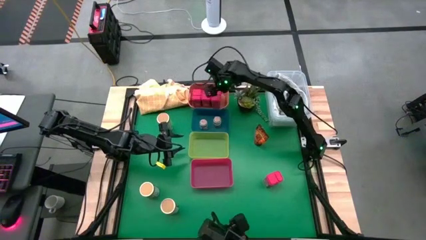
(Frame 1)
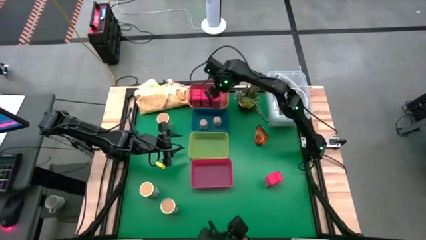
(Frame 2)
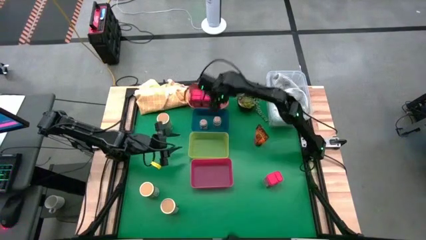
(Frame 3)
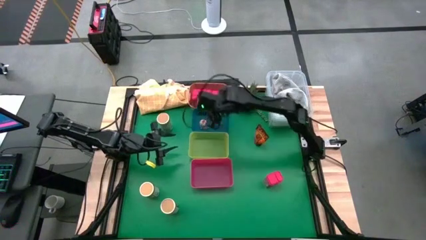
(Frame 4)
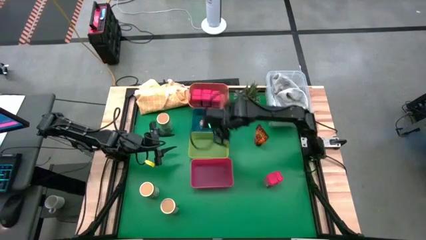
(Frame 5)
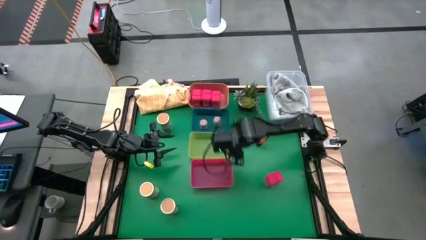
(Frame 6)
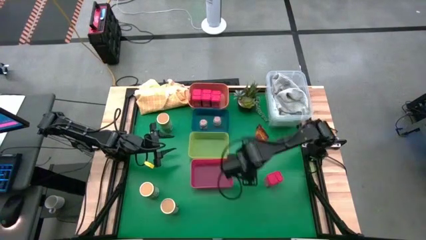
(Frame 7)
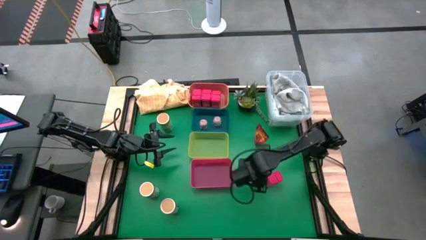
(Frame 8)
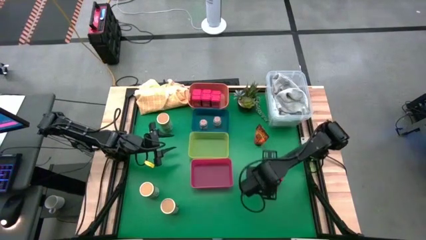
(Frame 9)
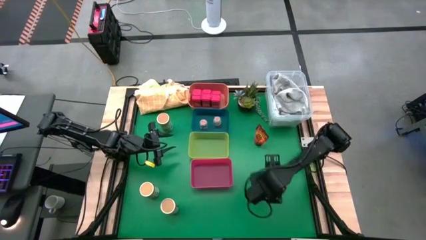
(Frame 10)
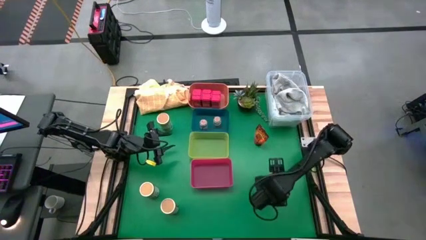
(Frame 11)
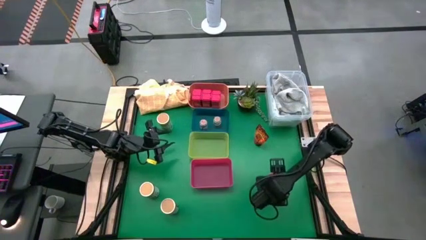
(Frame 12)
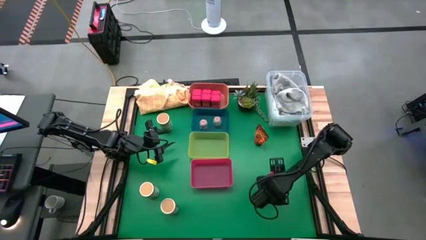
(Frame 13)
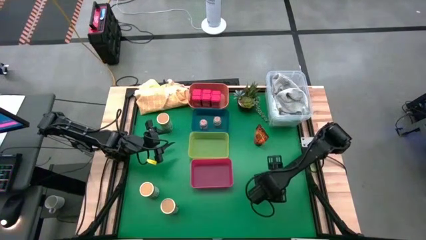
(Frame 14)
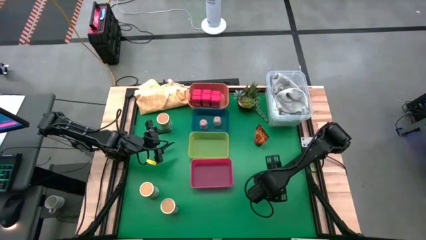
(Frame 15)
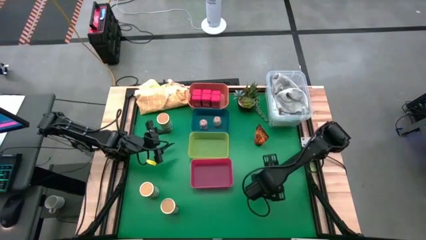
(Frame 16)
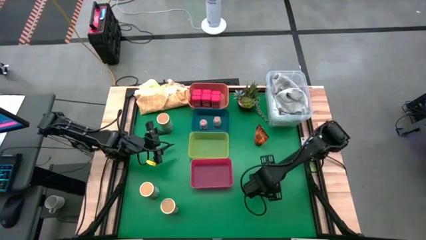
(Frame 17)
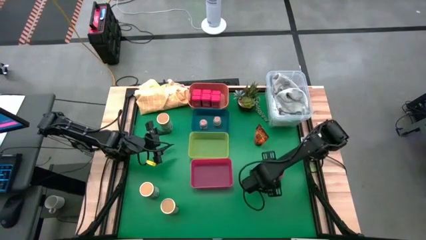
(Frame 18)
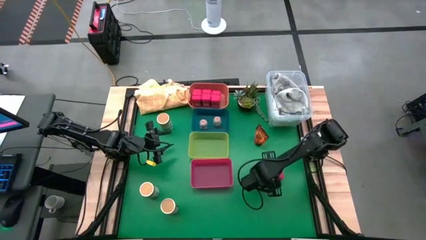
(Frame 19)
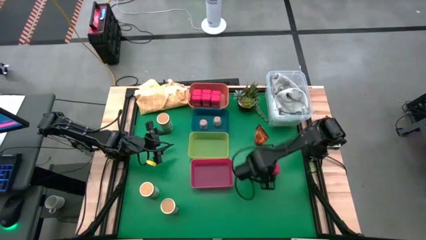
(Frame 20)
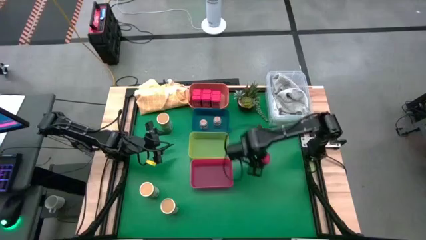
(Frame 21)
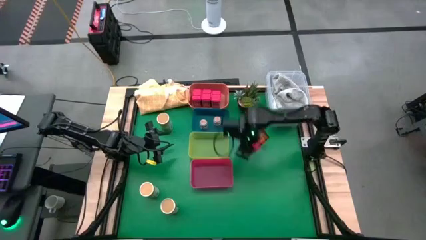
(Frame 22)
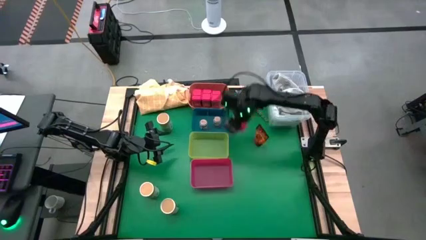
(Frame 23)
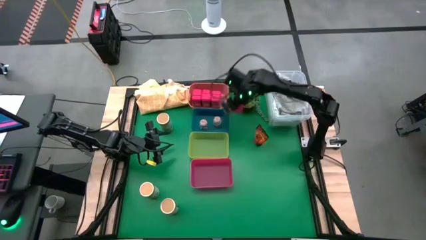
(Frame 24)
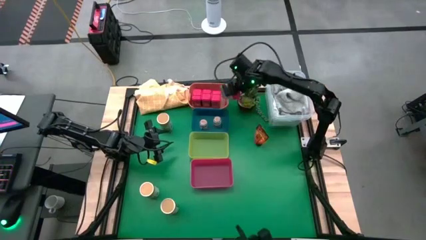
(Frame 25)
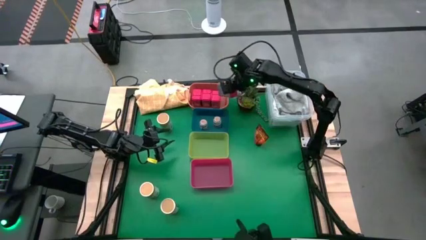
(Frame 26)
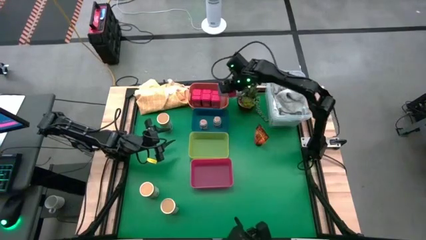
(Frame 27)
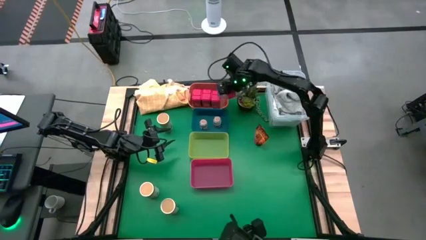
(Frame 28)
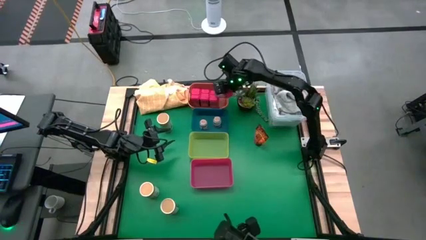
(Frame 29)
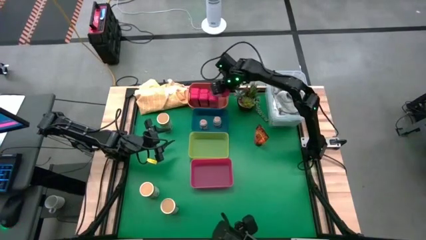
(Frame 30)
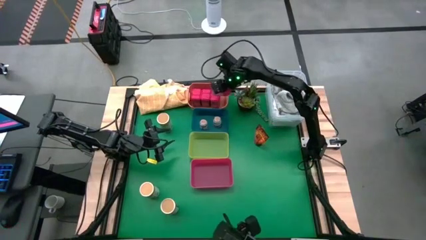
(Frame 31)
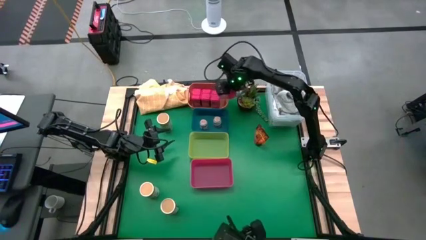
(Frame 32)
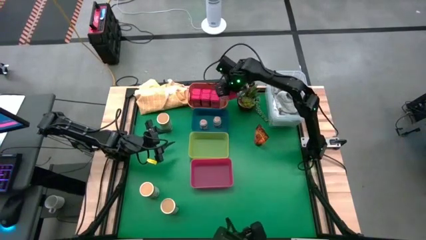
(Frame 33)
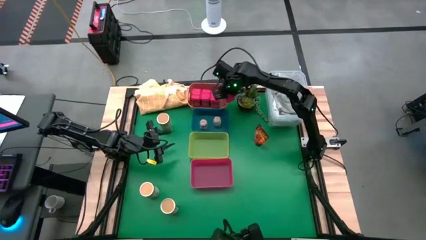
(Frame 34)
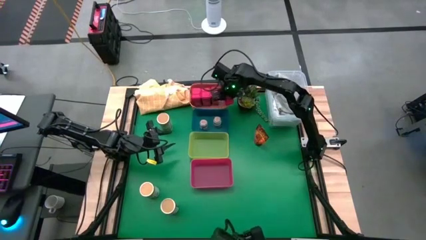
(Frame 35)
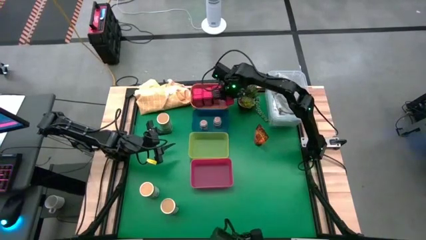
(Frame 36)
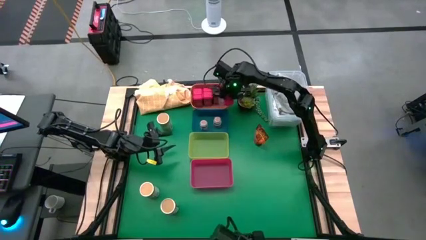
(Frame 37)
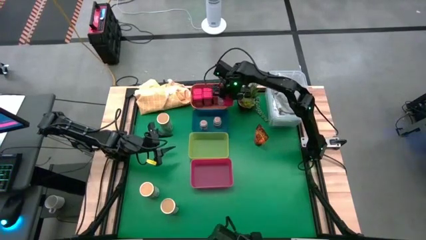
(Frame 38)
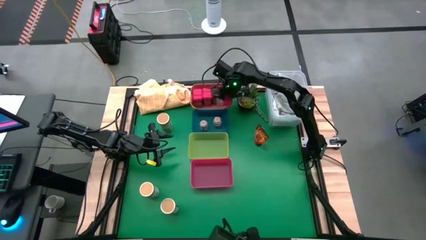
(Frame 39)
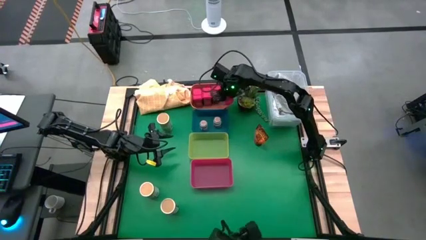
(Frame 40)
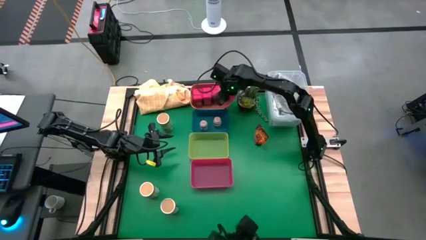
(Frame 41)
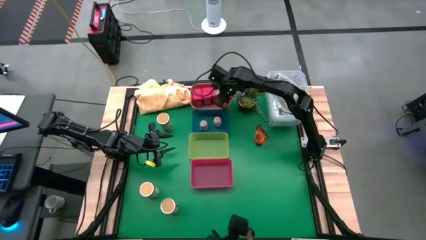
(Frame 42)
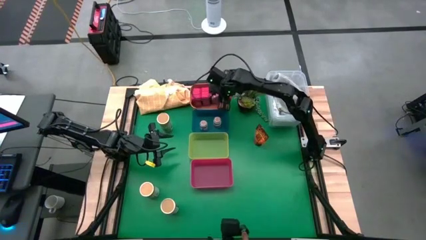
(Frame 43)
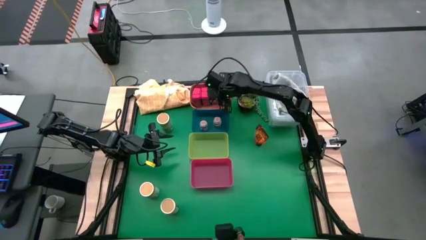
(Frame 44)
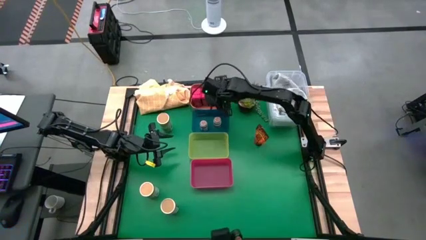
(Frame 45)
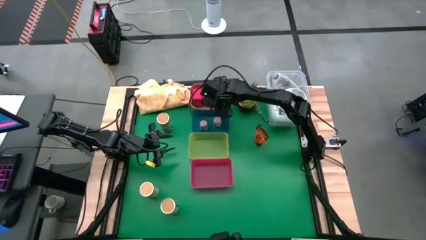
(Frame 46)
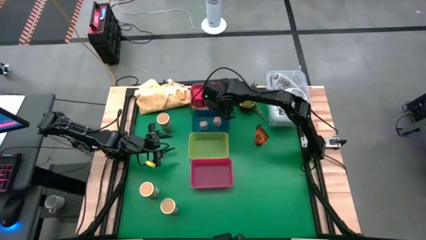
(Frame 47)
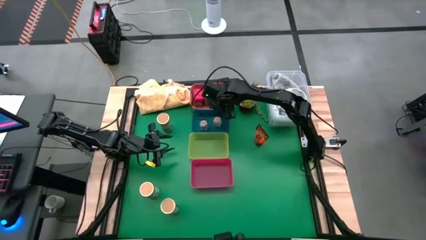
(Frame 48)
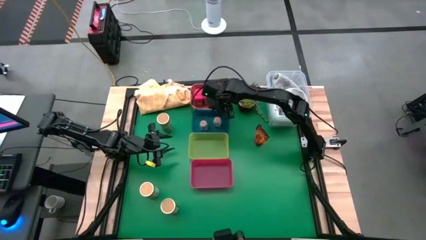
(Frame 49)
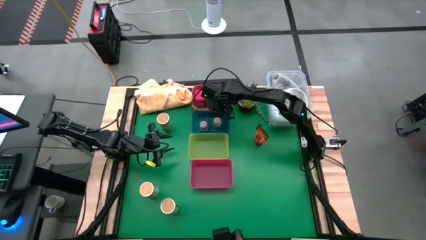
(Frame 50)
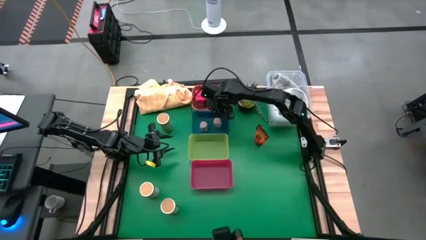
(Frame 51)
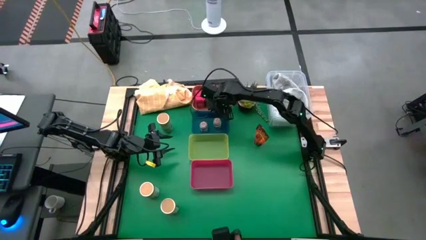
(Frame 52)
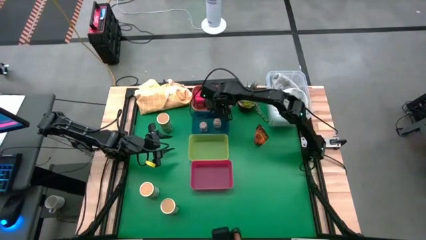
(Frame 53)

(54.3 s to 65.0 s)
Task: Sort spices by type
Put the red seasoning can into the orange bin

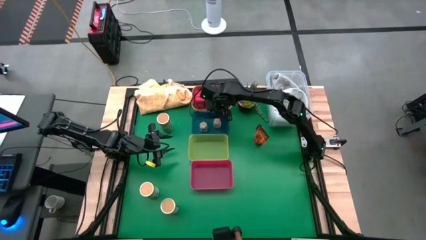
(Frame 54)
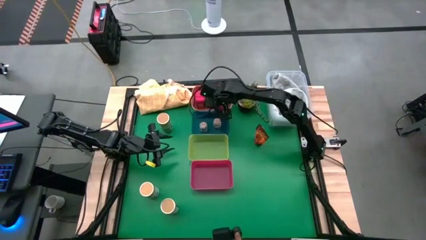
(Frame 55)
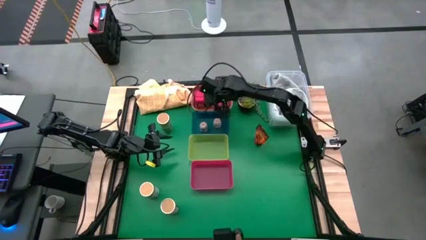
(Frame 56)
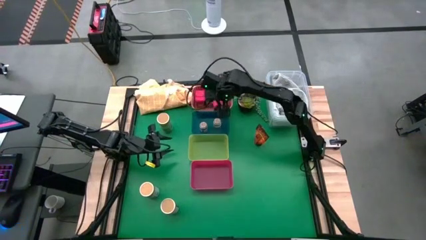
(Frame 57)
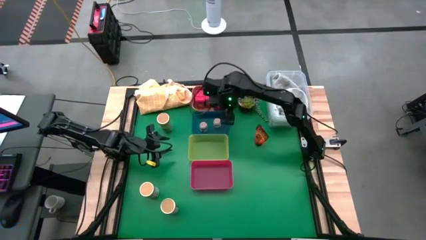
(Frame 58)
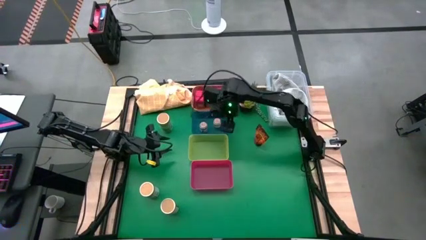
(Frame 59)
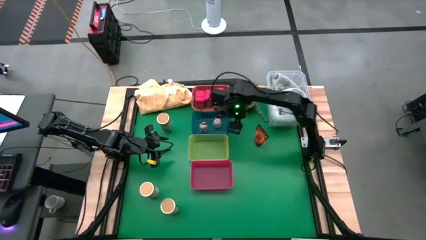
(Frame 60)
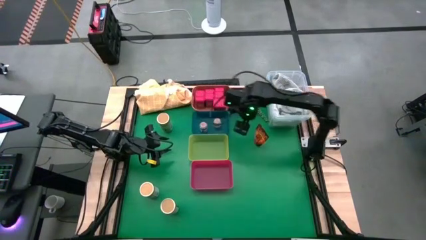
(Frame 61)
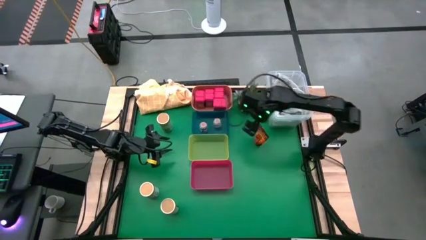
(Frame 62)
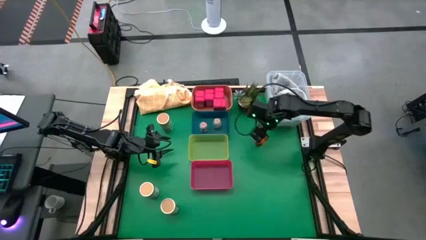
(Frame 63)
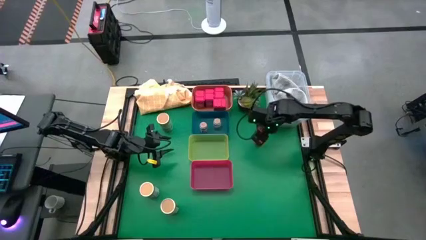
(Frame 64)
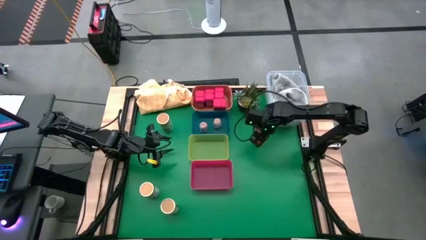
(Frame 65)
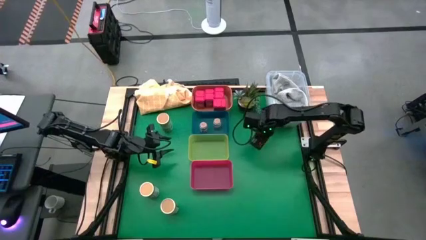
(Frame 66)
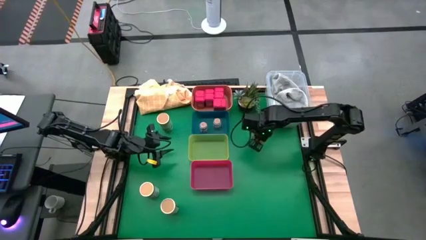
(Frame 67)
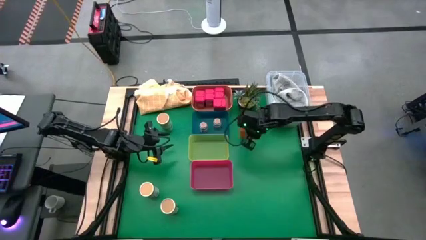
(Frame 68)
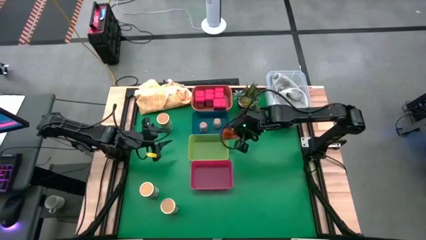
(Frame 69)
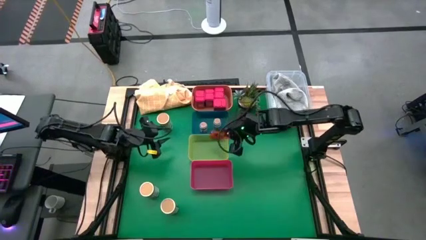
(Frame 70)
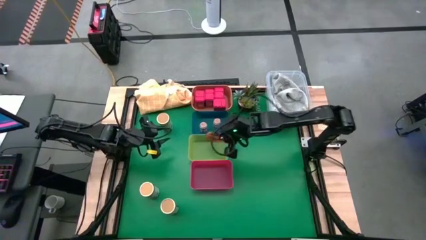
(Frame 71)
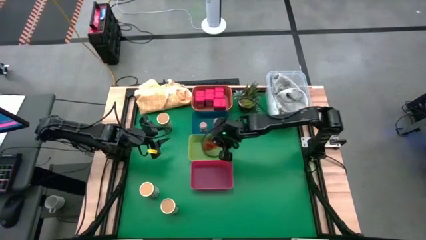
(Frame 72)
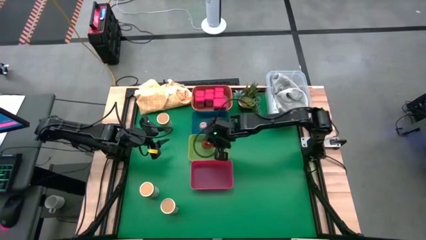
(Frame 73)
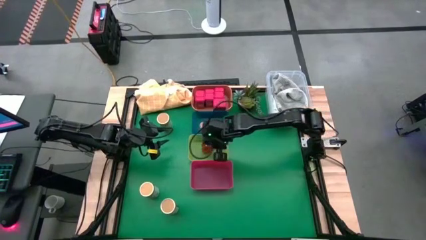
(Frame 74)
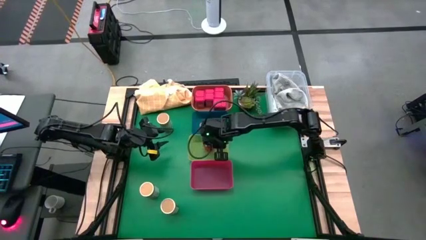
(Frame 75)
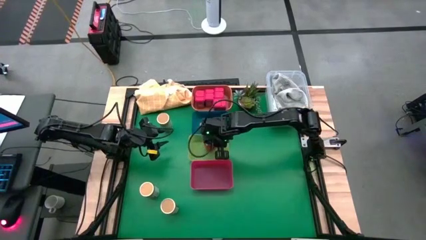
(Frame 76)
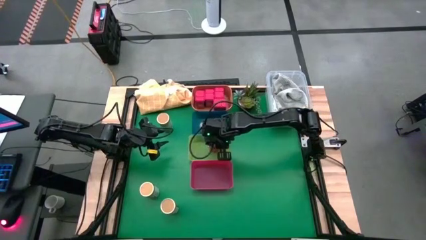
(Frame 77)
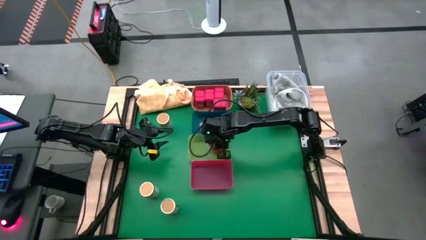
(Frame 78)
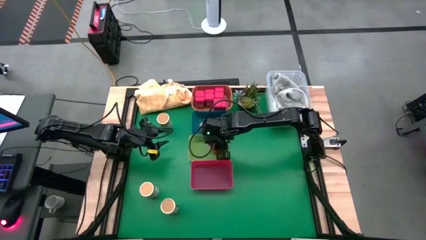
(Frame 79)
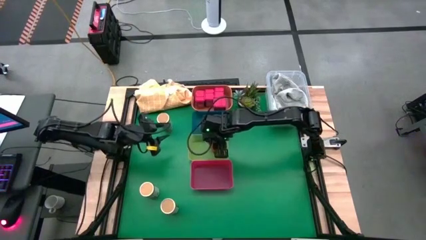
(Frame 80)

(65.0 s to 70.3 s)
Put the seasoning bag into the green bin
